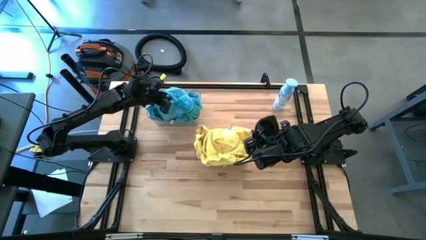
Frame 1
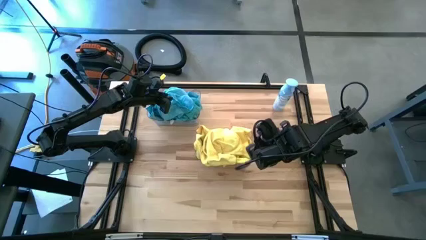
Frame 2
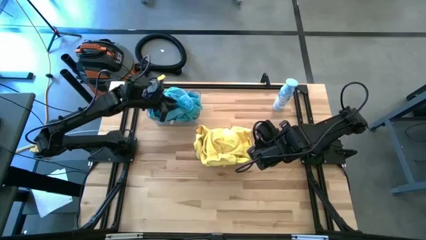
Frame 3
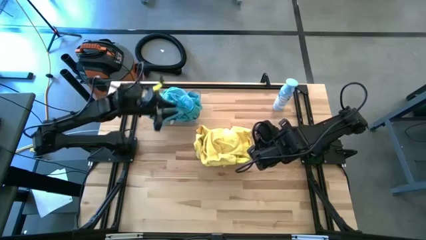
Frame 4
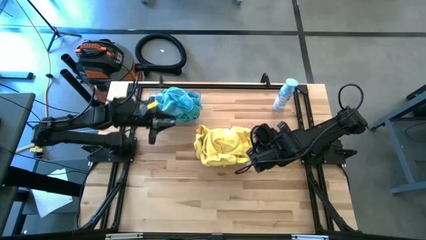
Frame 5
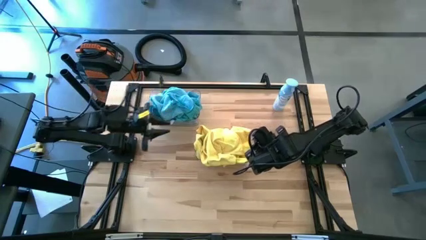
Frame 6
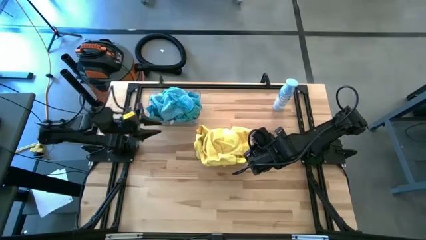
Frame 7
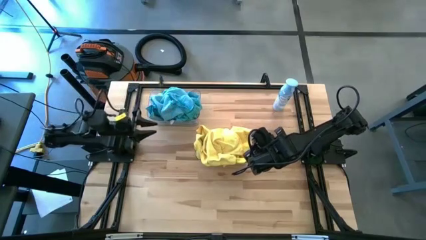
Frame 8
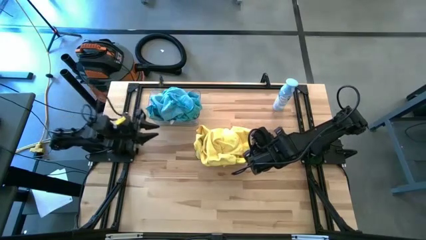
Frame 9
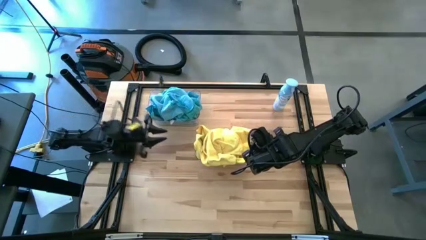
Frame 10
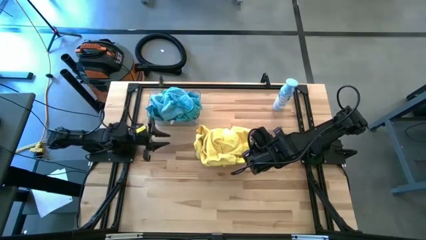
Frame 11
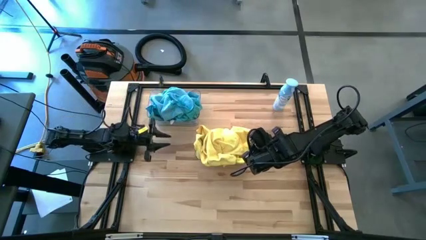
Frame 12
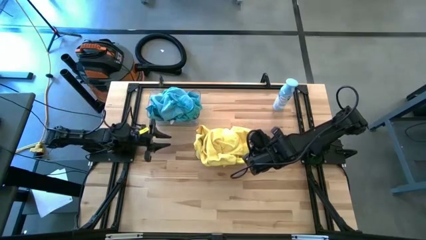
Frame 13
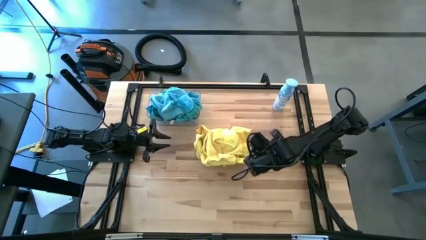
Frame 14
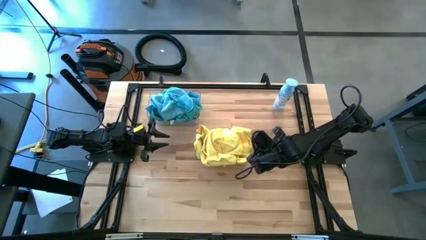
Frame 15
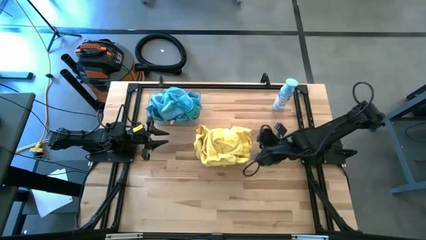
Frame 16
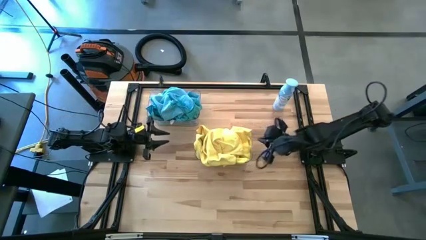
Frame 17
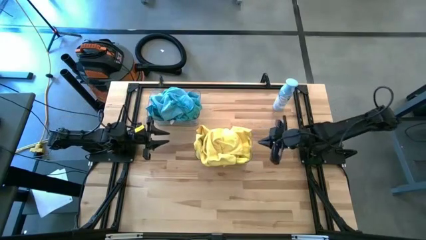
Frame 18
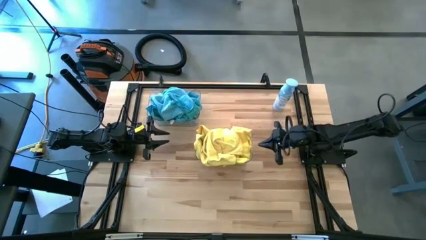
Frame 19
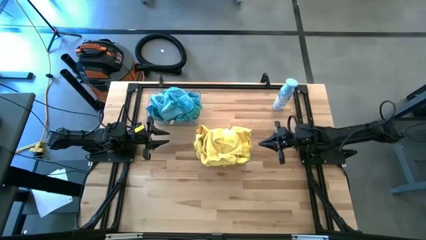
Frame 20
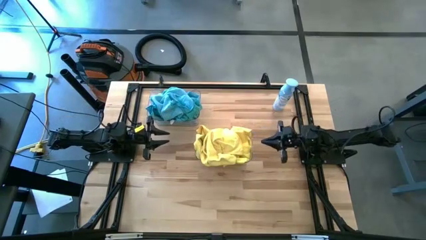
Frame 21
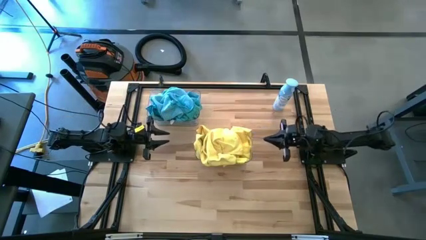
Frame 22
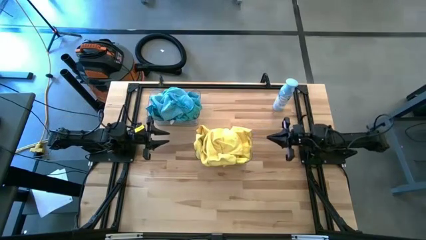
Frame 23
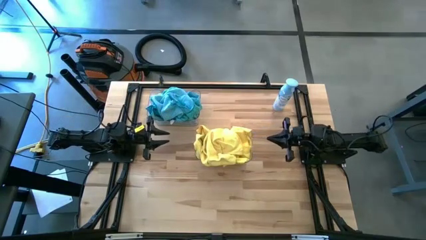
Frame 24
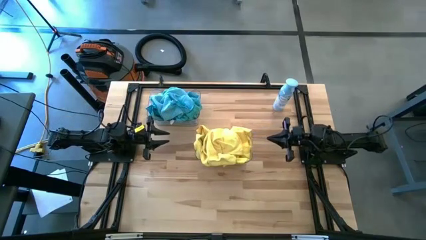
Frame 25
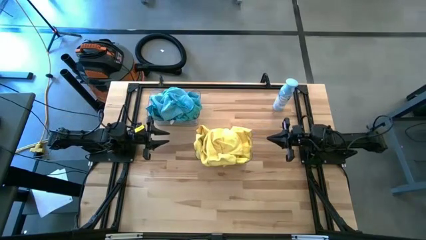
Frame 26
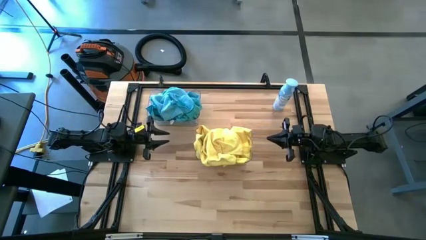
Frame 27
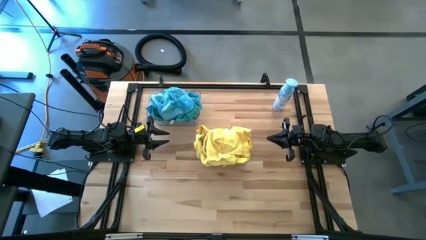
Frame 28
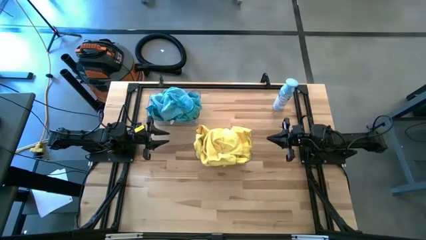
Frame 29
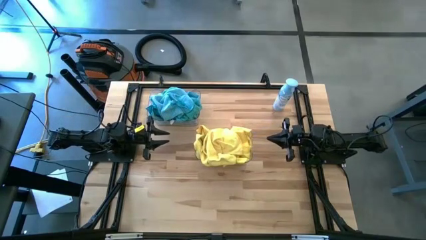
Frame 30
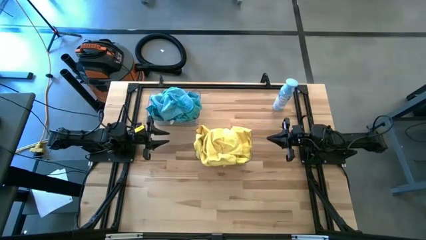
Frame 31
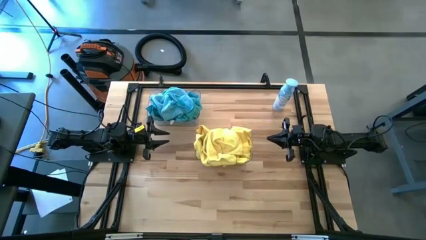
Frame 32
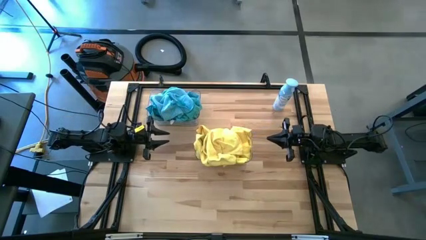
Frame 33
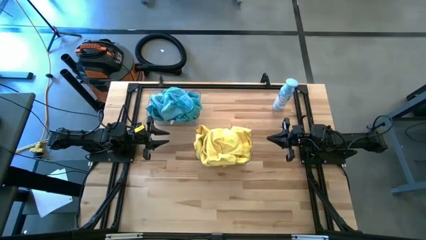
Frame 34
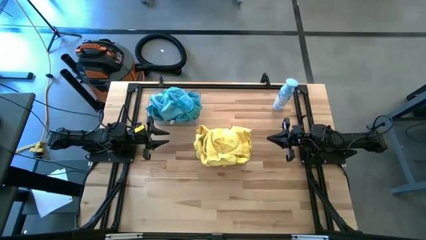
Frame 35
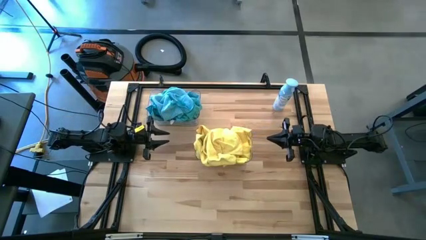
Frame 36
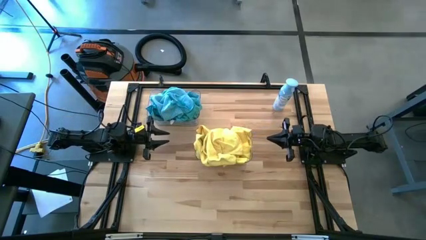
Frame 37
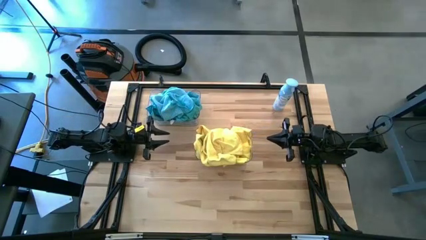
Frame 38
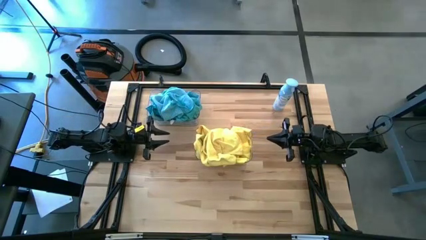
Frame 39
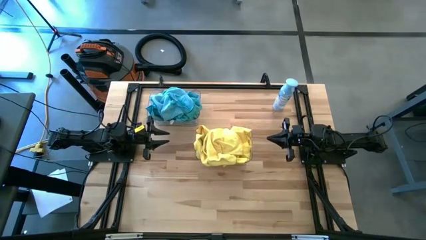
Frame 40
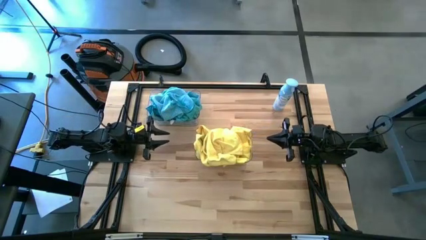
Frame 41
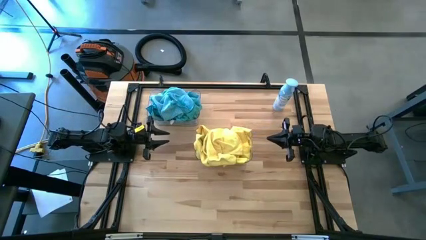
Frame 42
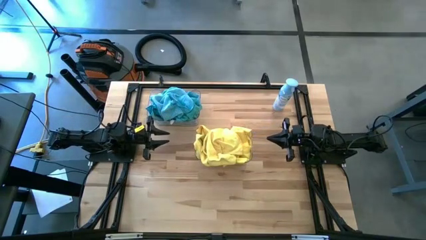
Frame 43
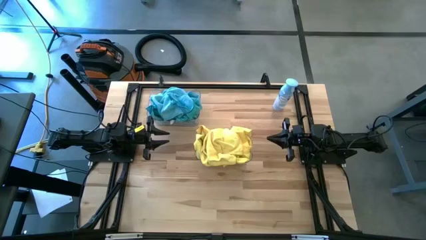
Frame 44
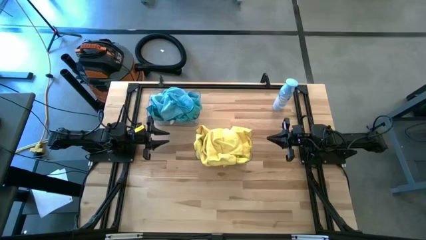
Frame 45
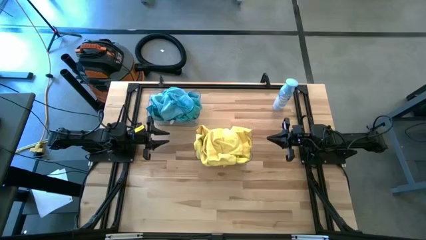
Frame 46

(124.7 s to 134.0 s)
Task: Sort microfiber towel by color & place in baskets
Return to Home Position

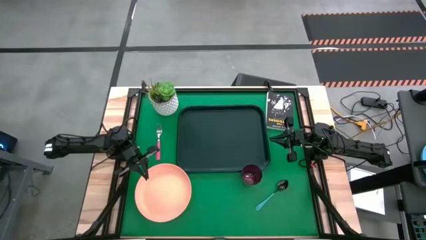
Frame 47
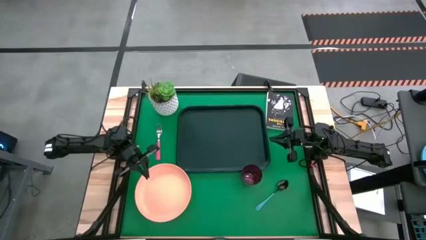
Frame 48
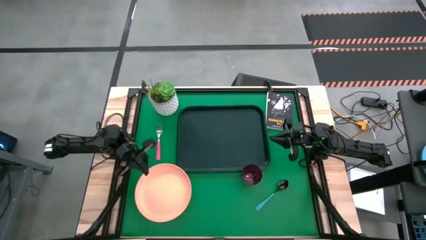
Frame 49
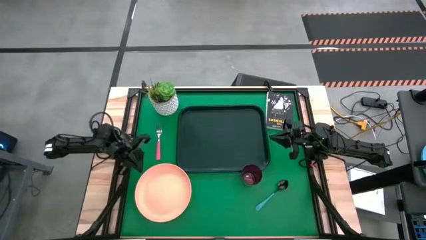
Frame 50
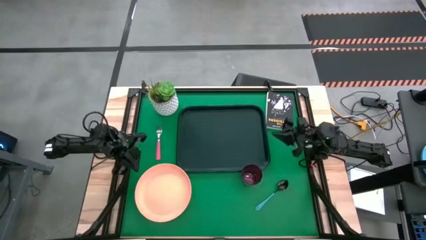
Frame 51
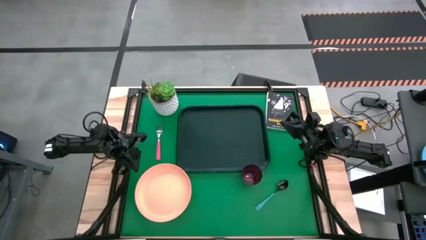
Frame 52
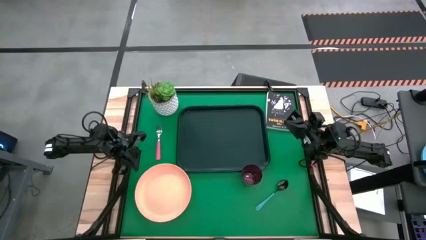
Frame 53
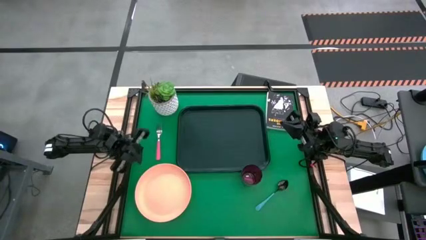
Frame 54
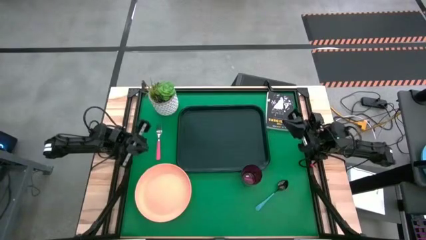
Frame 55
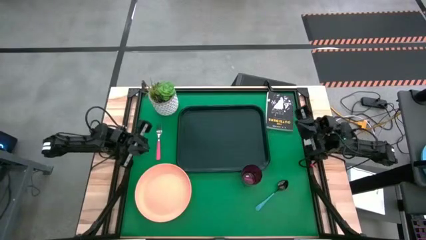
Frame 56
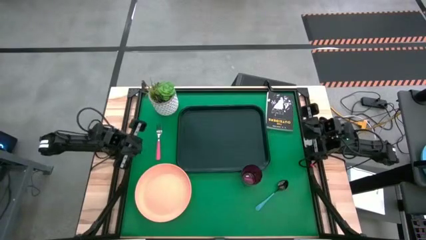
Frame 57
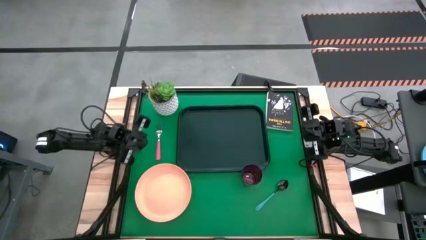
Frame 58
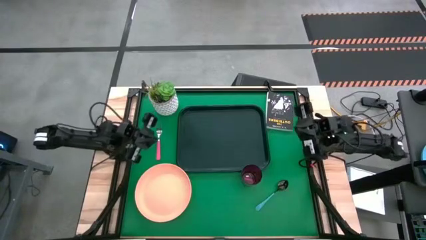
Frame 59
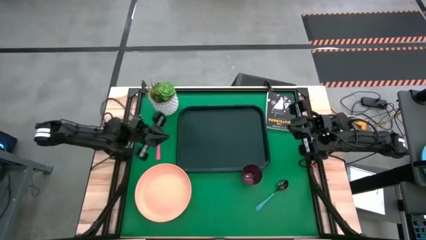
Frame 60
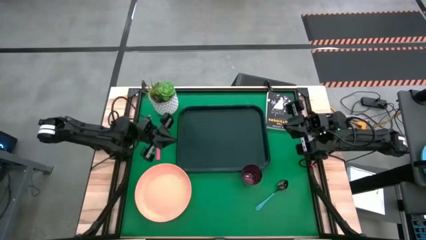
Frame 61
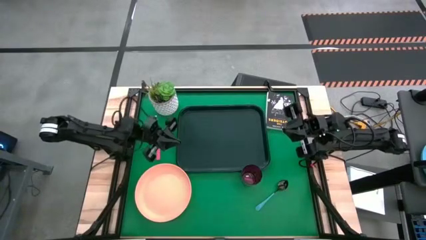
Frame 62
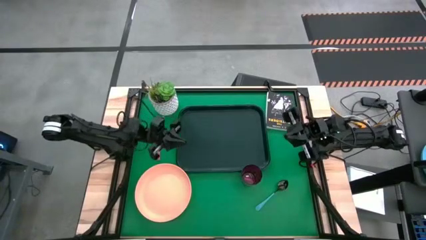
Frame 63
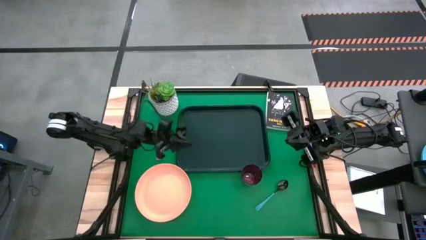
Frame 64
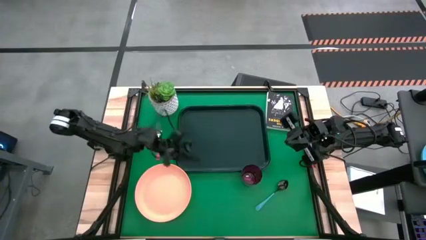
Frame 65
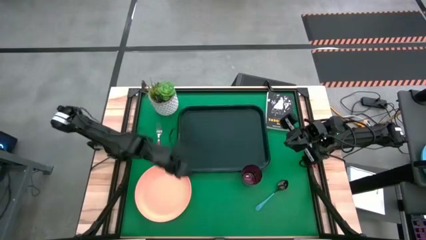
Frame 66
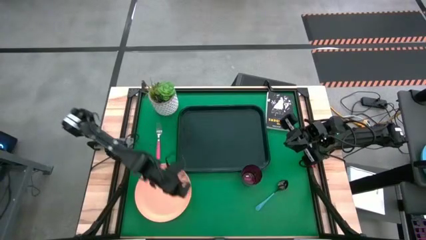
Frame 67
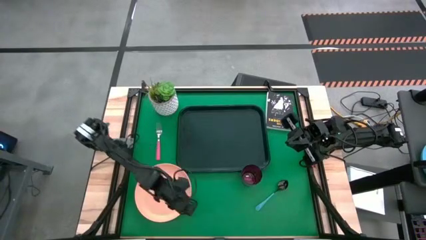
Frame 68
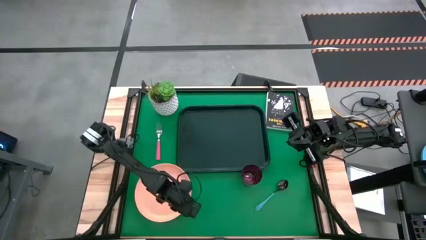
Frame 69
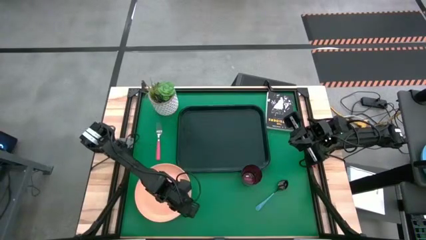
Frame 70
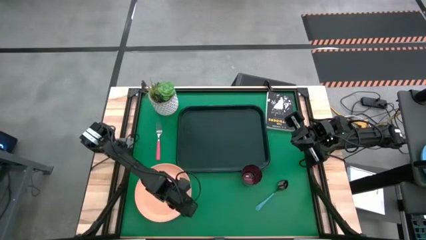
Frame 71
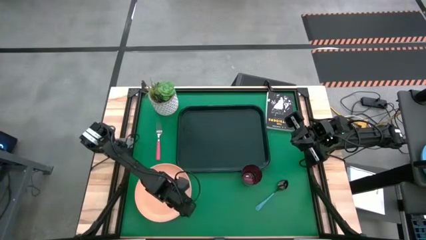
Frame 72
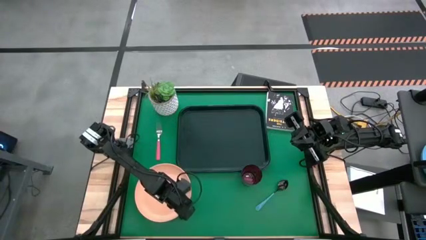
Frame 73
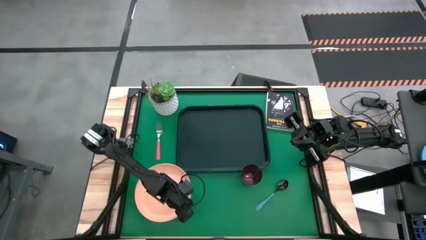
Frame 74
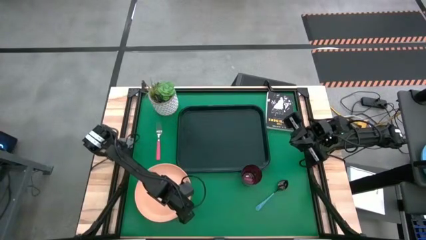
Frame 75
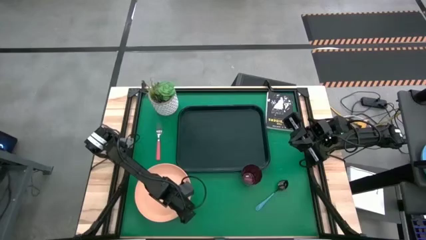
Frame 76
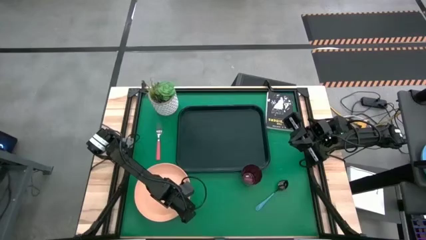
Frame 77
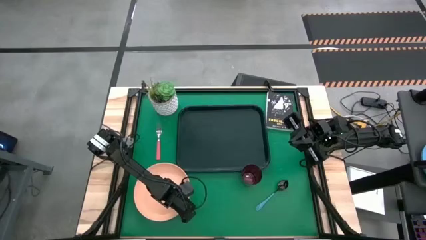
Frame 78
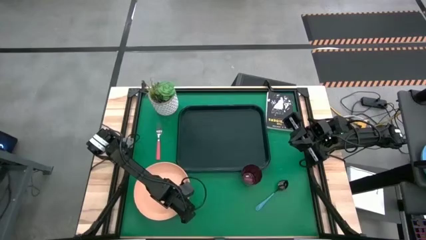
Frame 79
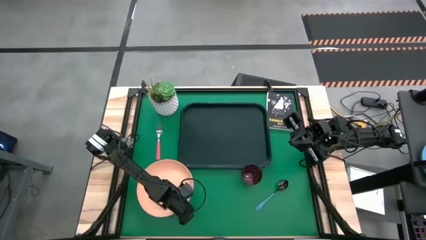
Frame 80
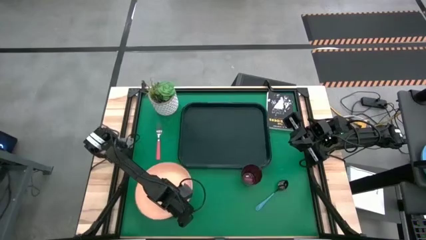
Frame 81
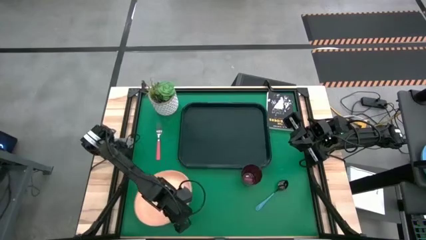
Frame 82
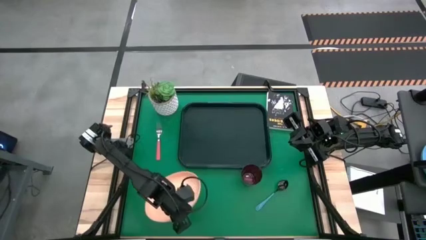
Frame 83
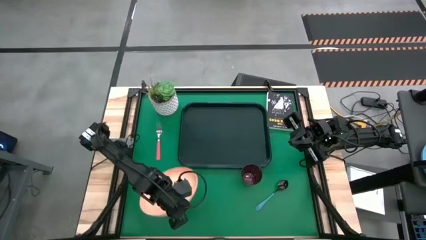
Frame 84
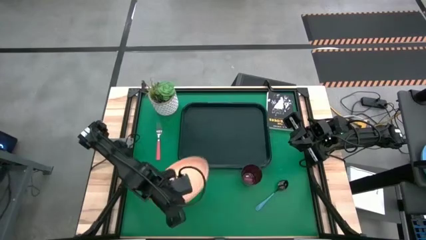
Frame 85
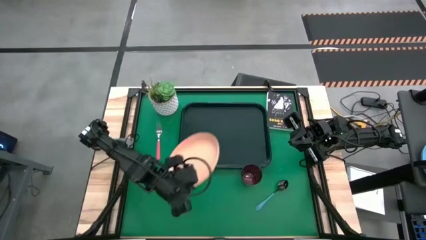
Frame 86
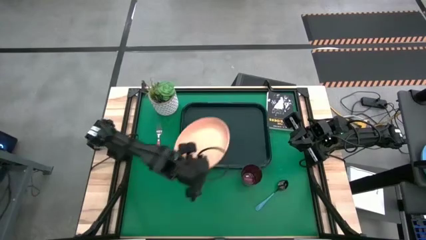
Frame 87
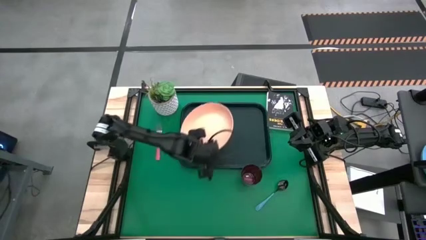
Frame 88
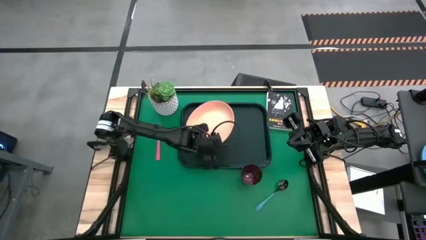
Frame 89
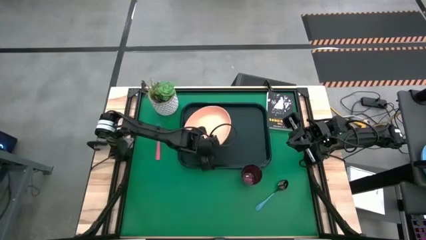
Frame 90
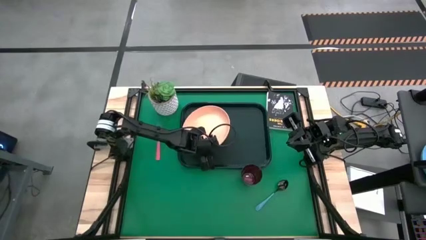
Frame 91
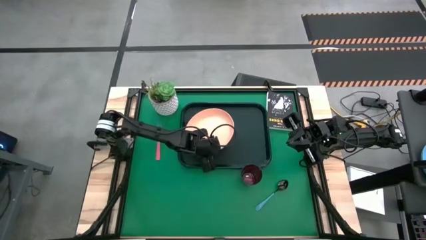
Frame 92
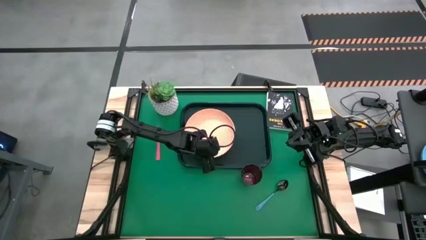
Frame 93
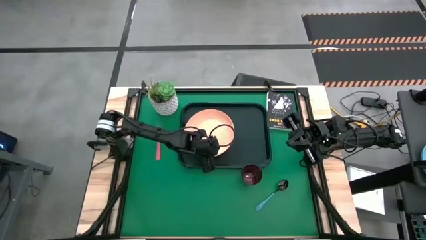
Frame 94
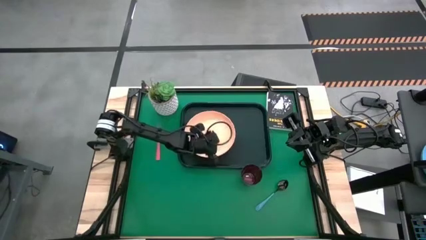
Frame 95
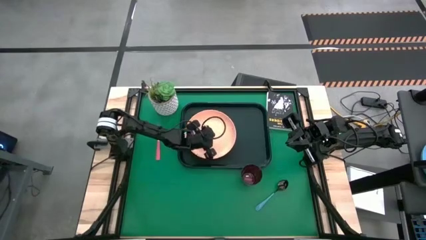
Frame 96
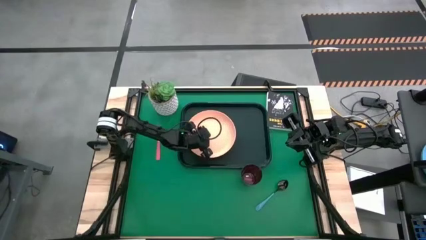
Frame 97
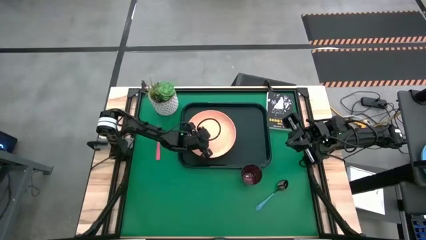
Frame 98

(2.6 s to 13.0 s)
Task: Pick and place plate/cup/fork/spoon on tray
Put the orange plate on the dark green serving tray
